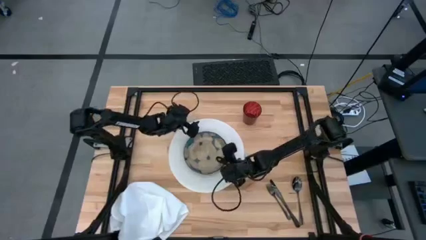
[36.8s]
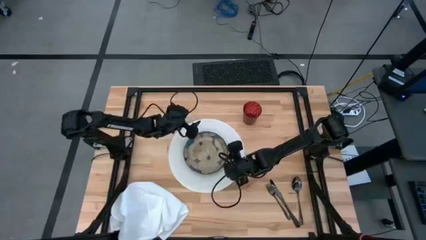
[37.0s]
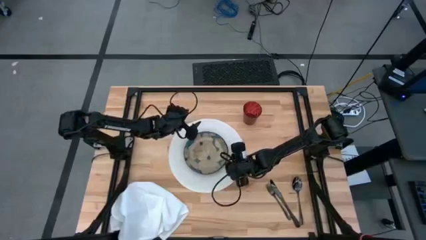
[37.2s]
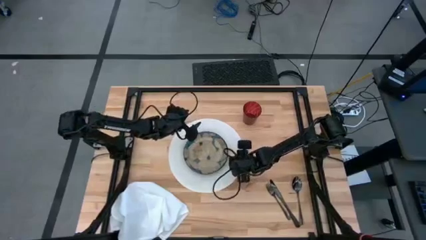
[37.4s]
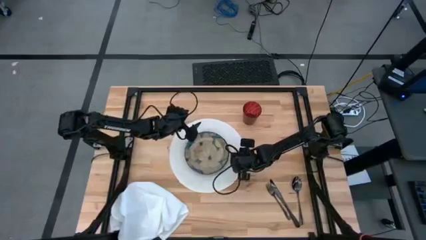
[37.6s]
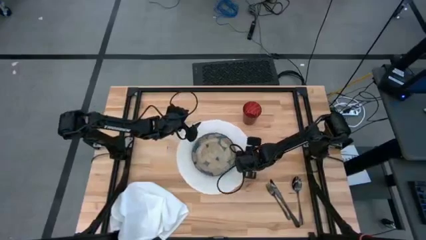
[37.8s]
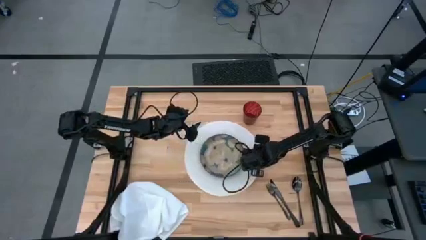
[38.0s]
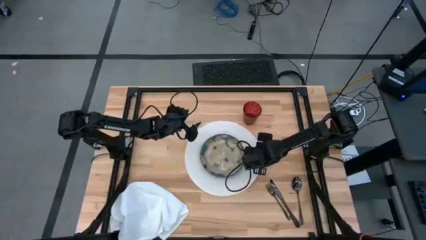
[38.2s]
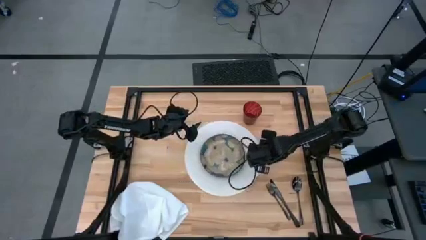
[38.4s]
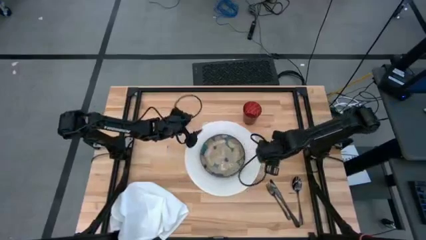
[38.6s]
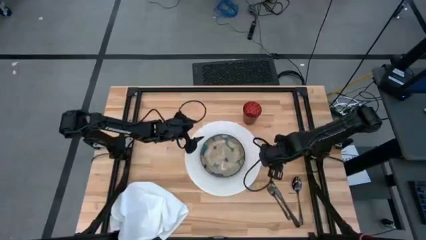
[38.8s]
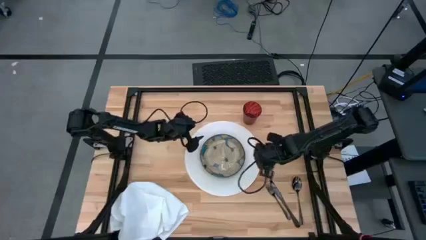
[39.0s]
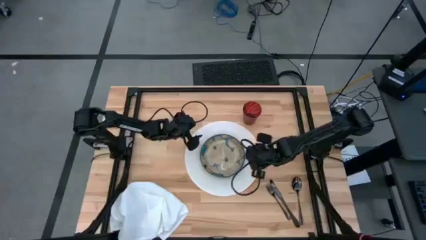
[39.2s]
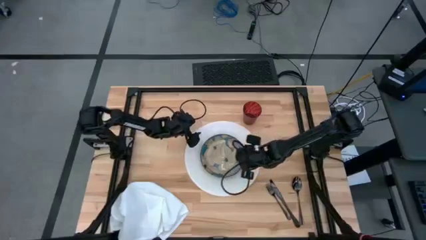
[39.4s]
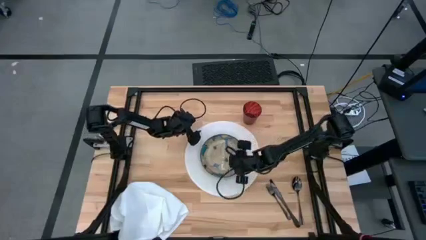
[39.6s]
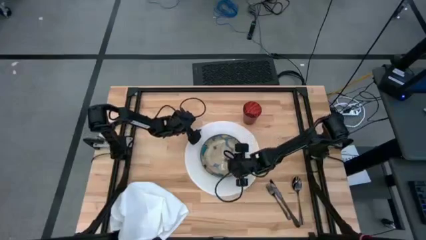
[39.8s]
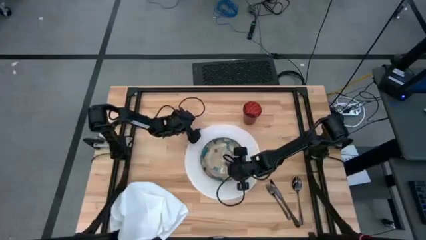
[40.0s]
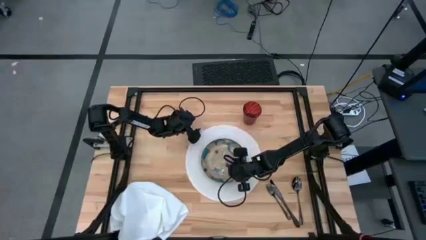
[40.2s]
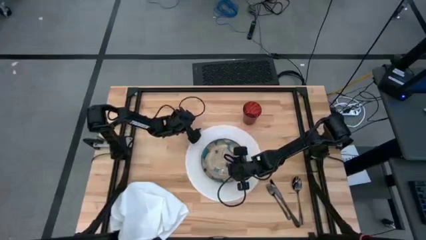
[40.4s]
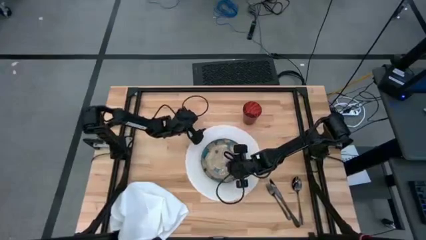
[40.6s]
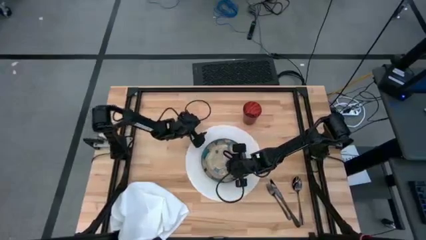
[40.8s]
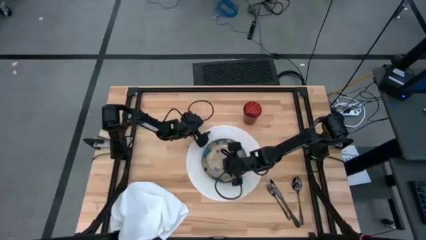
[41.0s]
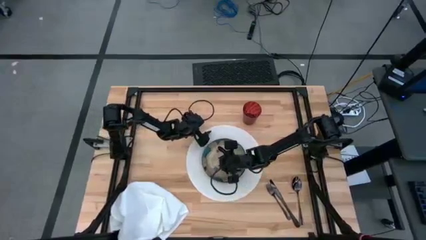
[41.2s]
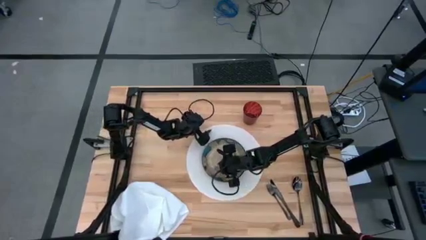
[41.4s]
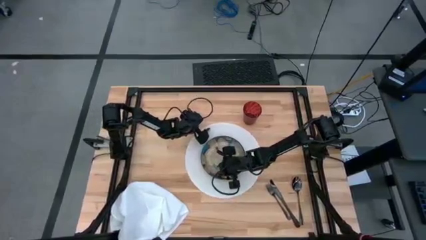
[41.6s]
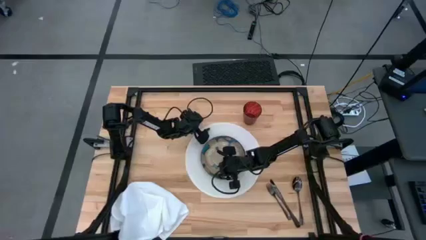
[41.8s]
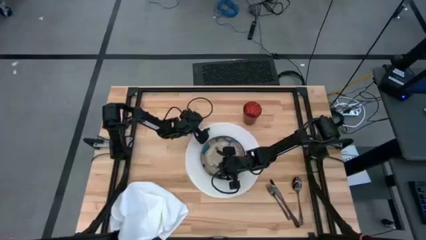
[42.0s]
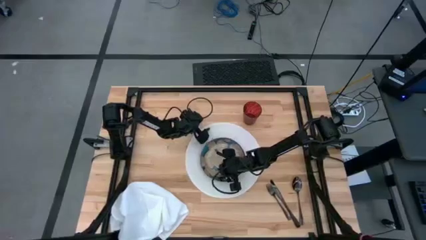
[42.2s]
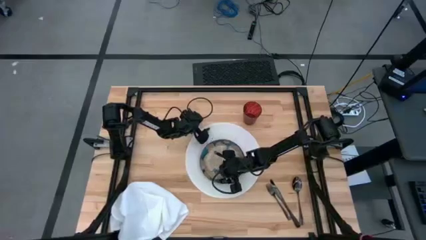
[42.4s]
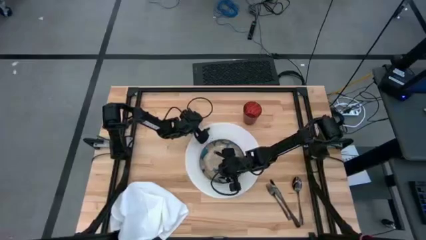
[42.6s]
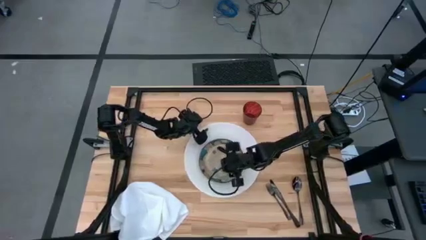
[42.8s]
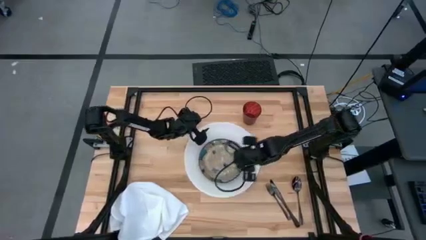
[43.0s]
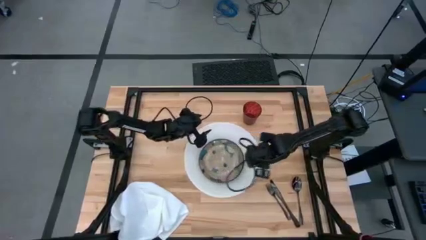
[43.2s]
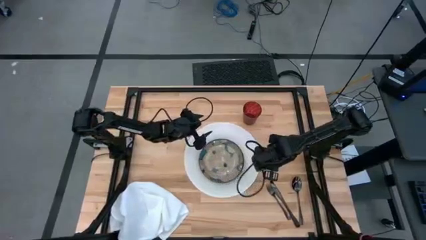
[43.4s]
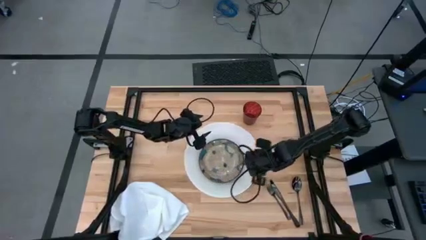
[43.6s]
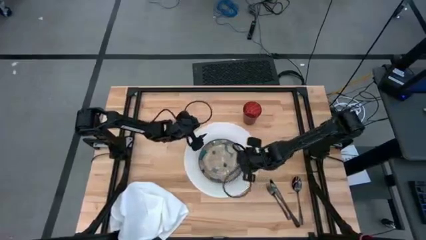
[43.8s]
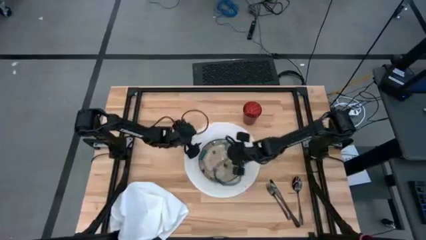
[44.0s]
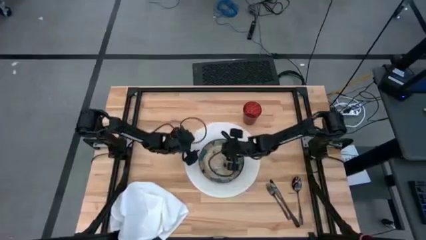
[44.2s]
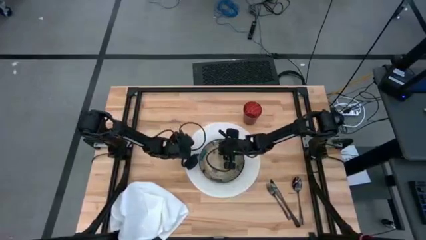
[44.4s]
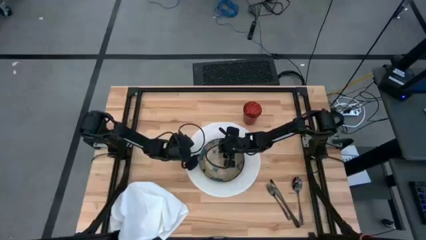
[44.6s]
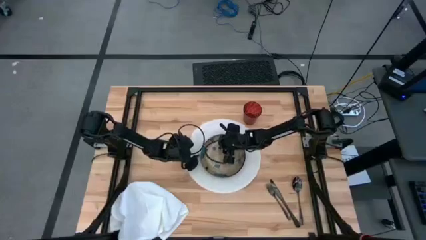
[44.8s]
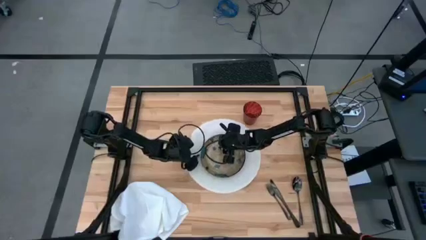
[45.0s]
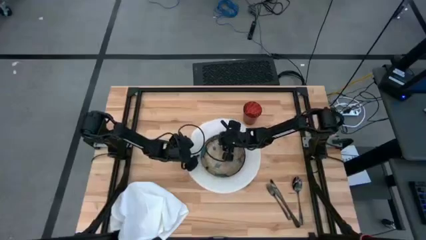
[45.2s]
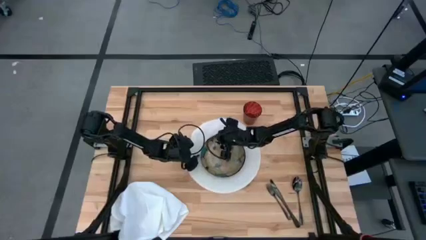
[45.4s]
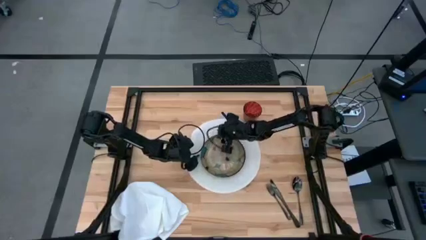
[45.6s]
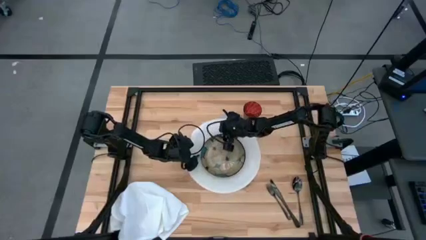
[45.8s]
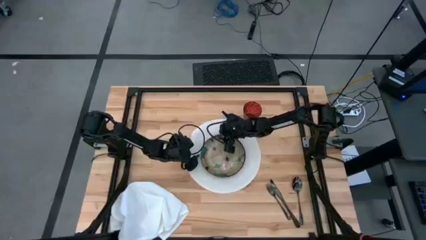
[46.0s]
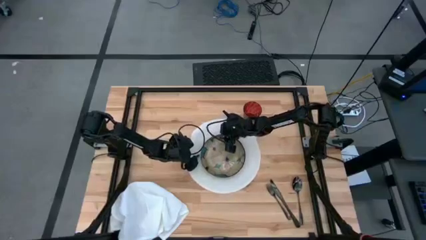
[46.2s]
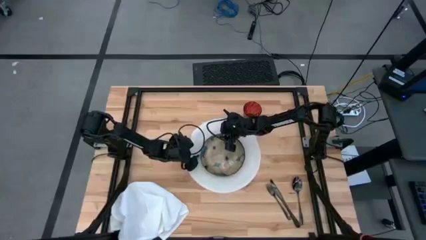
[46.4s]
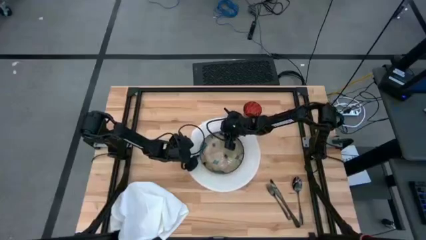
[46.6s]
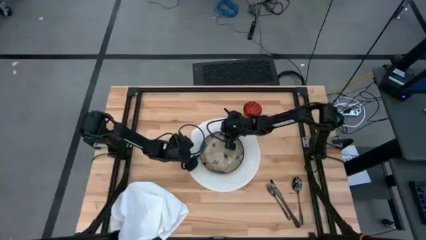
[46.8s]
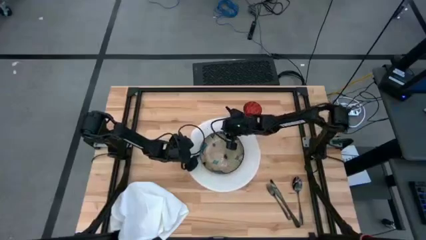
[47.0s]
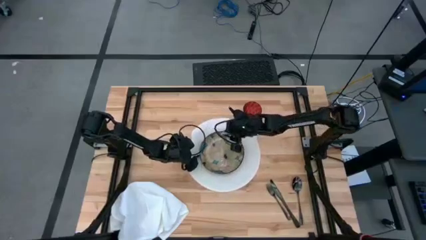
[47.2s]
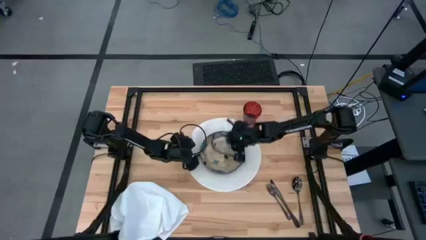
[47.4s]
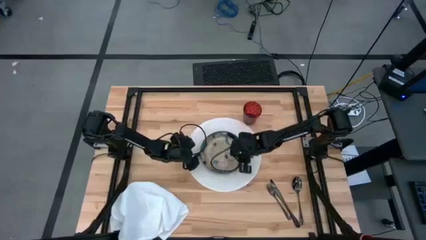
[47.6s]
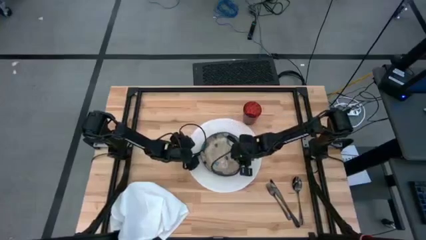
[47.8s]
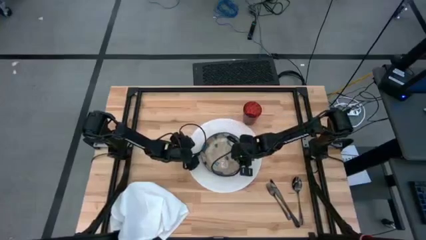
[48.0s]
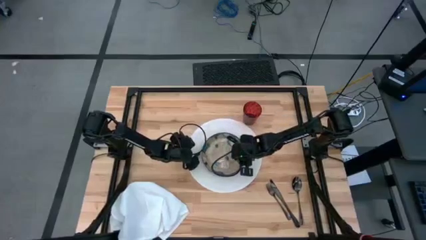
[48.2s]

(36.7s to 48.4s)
Task: Set table place
Put the decorated ceramic plate on the placemat

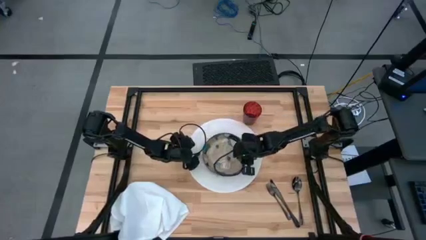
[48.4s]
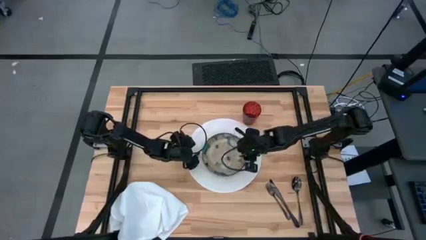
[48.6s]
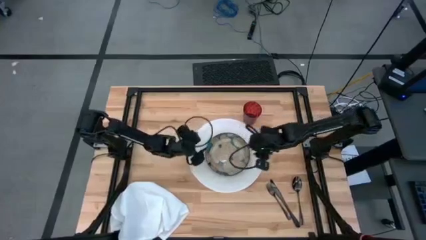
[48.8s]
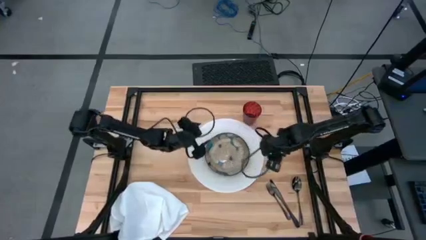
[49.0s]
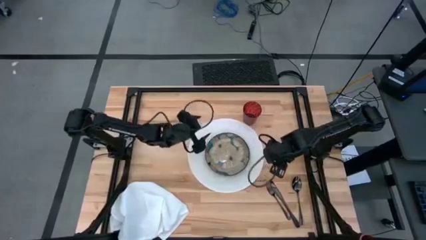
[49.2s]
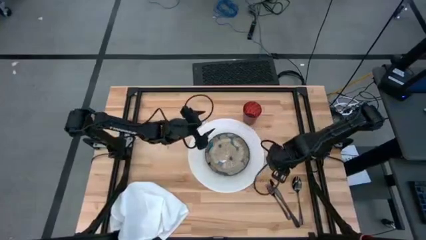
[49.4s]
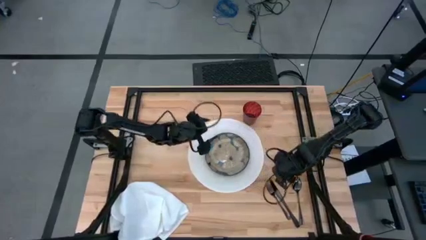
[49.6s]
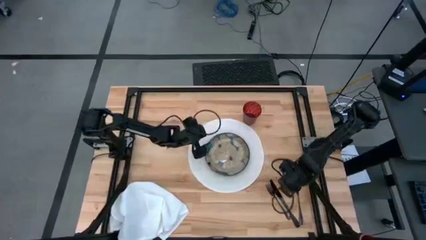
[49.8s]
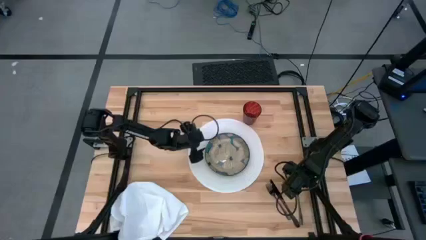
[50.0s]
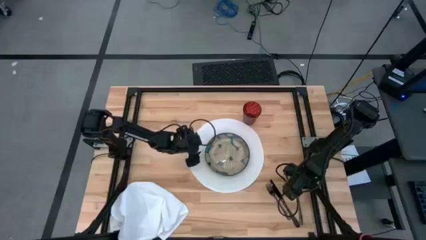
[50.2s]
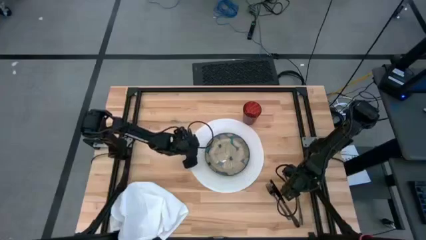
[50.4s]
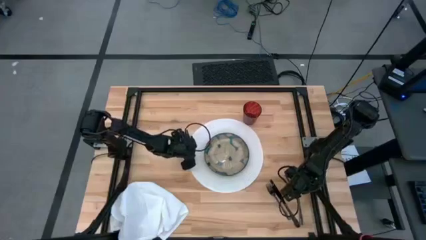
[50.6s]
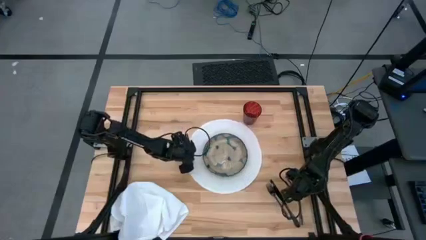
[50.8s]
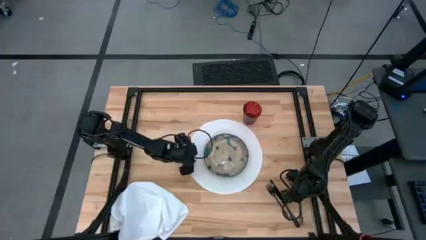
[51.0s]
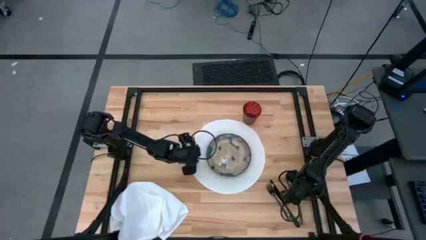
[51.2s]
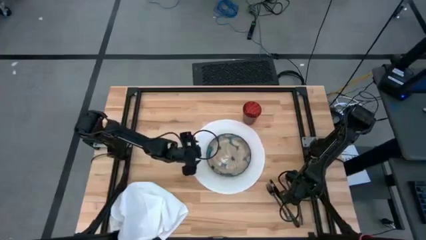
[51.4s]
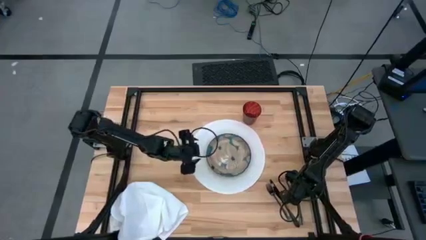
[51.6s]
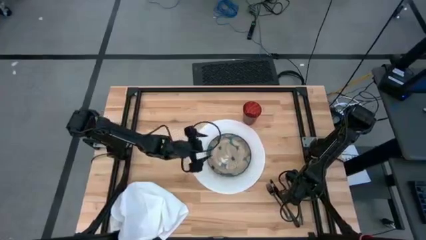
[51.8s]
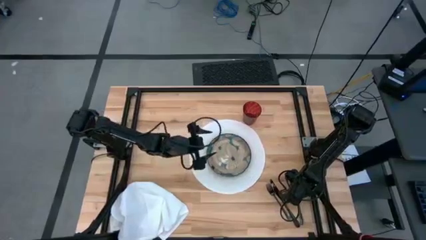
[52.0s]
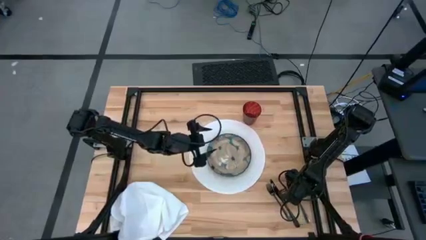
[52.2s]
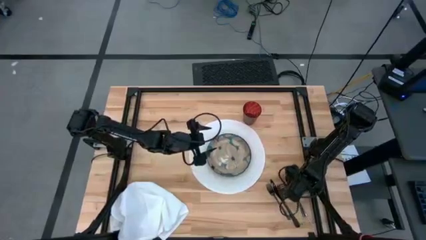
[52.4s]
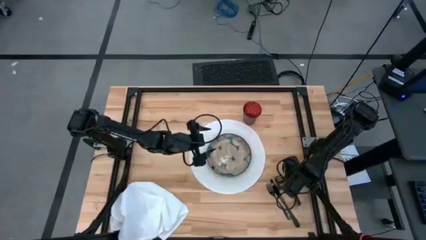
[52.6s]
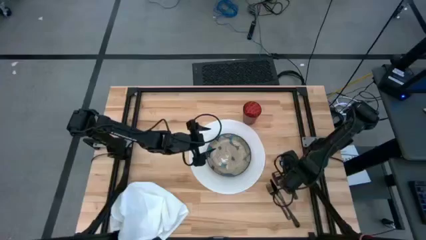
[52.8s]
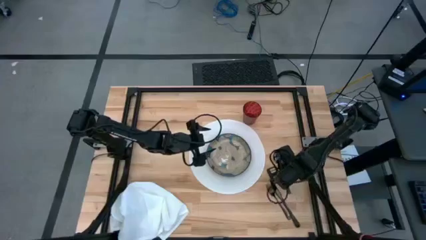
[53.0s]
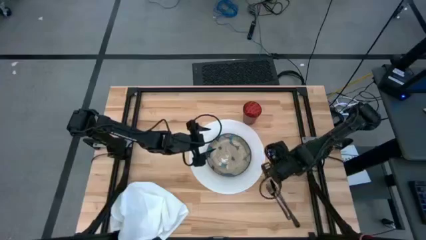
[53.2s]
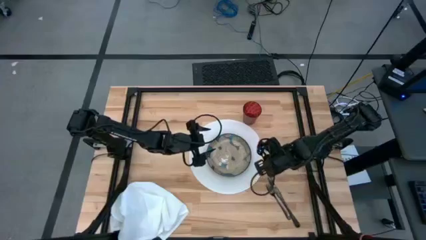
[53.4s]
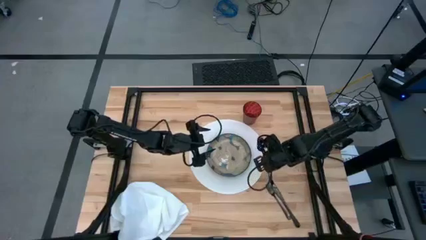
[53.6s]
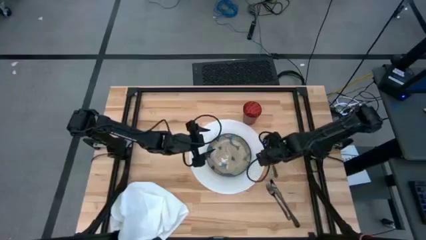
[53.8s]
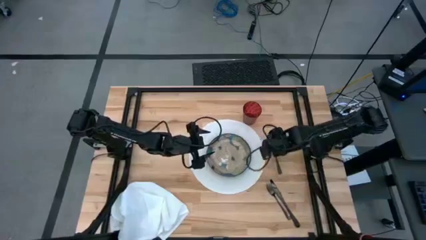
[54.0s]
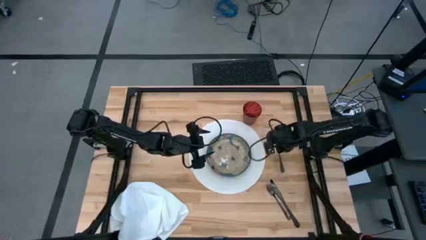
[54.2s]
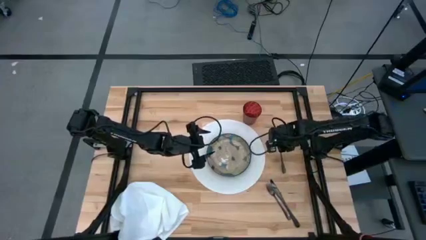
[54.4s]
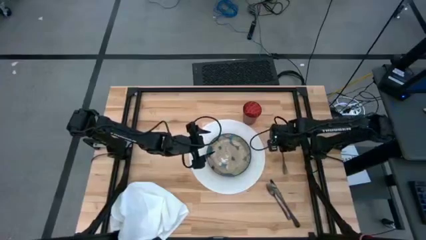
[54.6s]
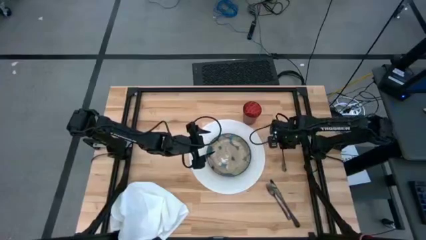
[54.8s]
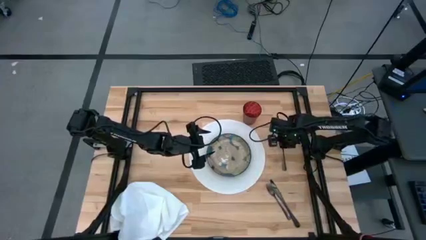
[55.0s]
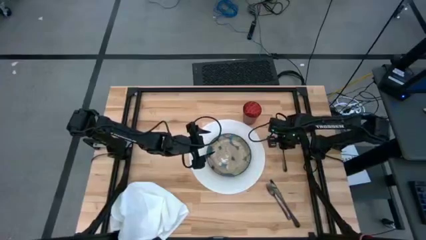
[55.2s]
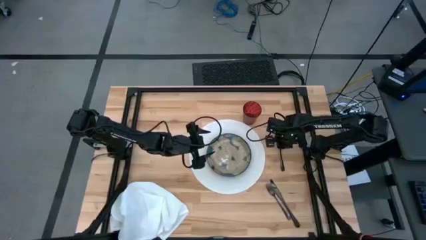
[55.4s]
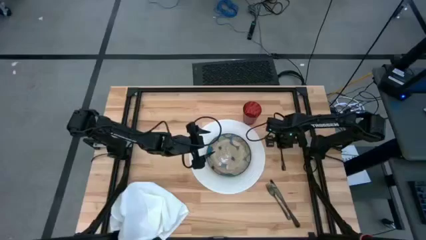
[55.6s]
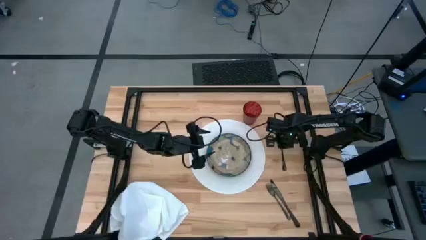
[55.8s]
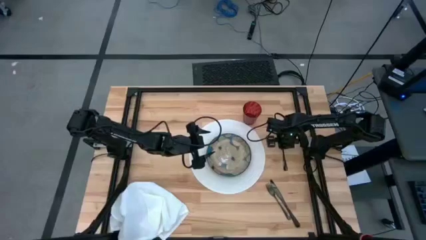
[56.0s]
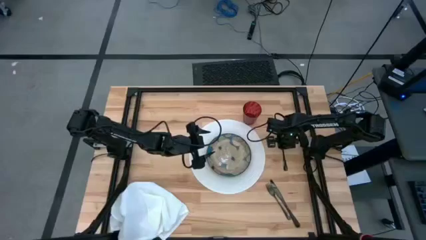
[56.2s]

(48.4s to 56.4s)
Move the spoon to the middle right of the table
